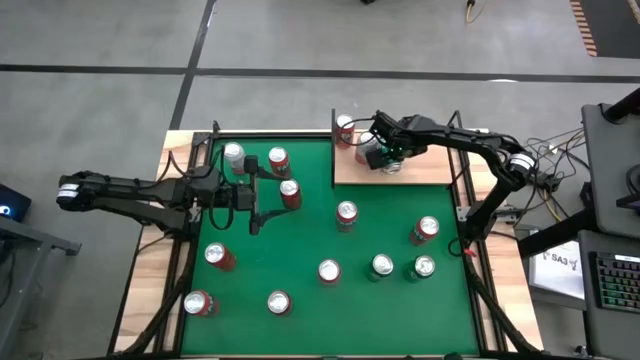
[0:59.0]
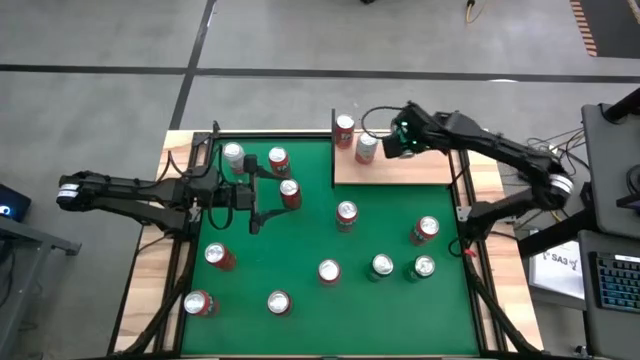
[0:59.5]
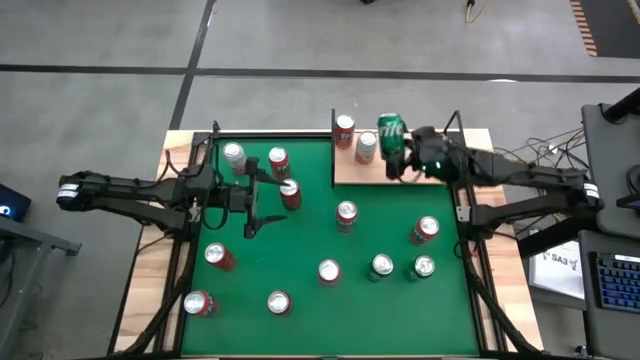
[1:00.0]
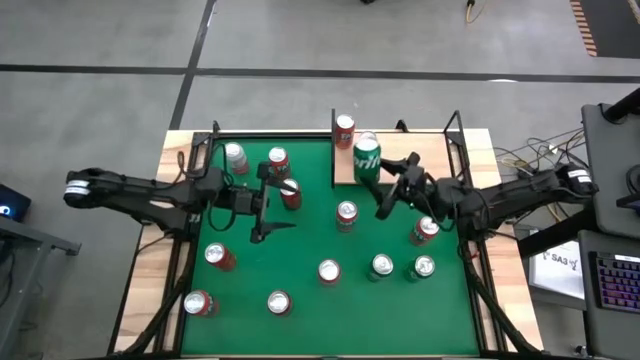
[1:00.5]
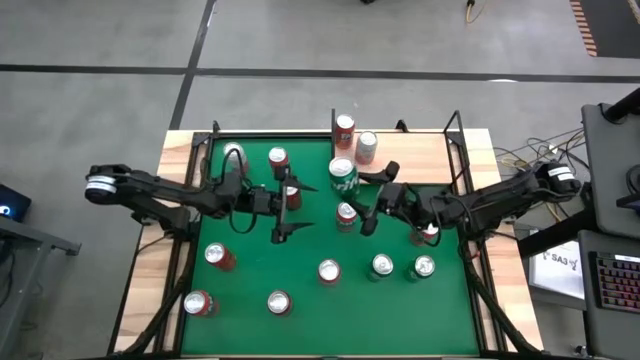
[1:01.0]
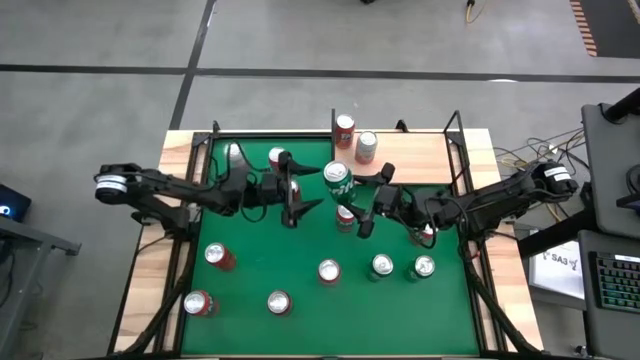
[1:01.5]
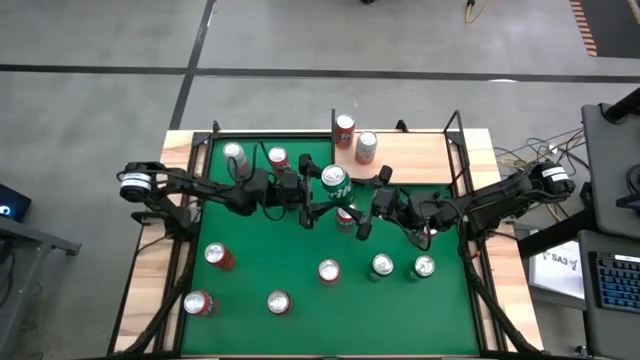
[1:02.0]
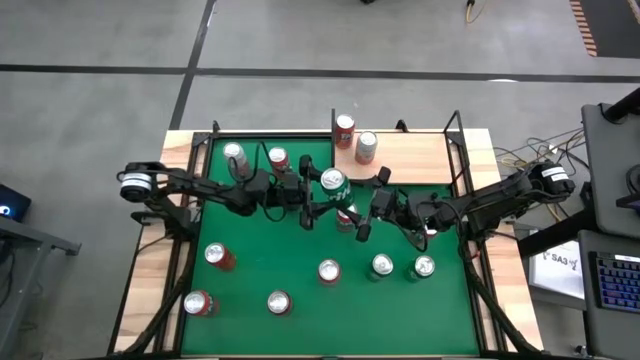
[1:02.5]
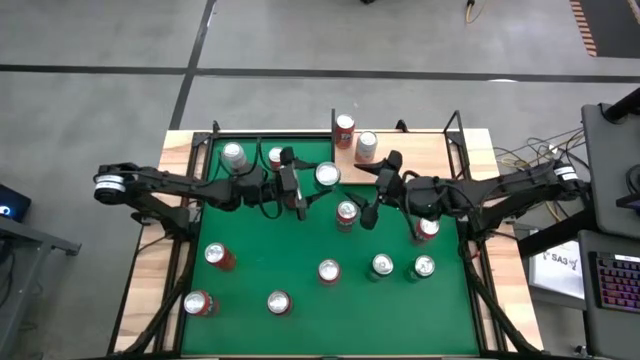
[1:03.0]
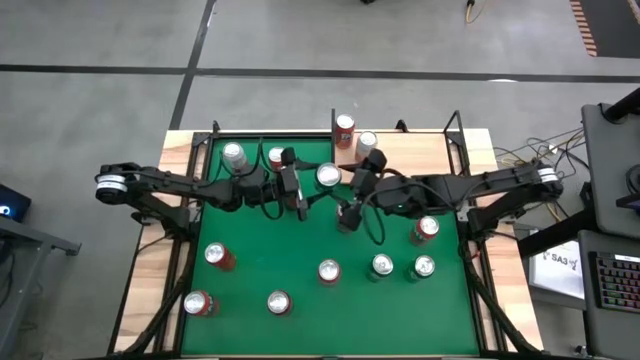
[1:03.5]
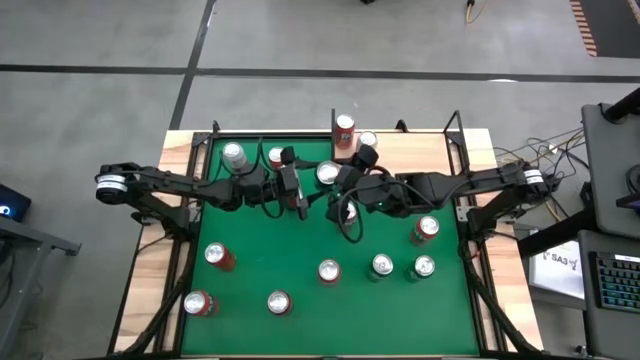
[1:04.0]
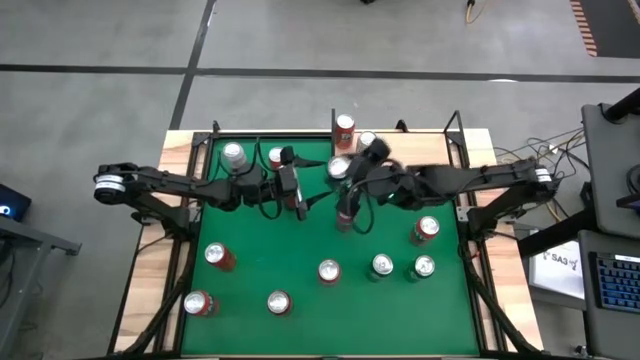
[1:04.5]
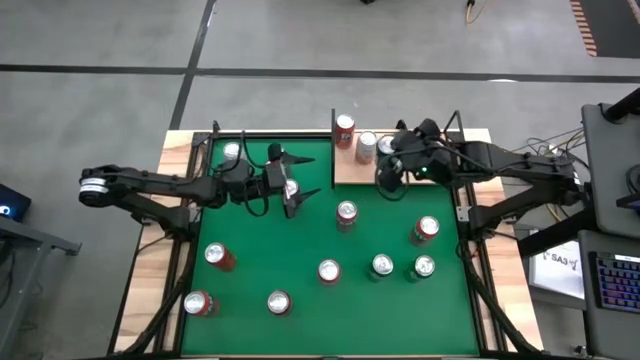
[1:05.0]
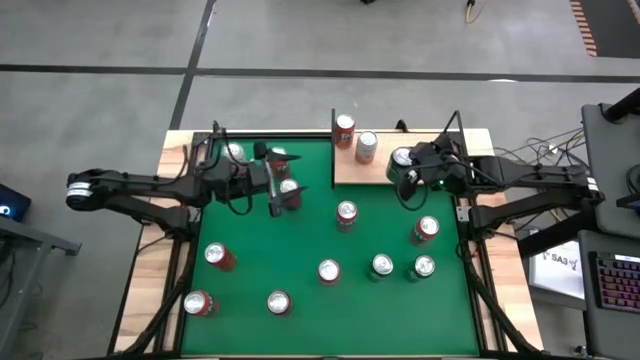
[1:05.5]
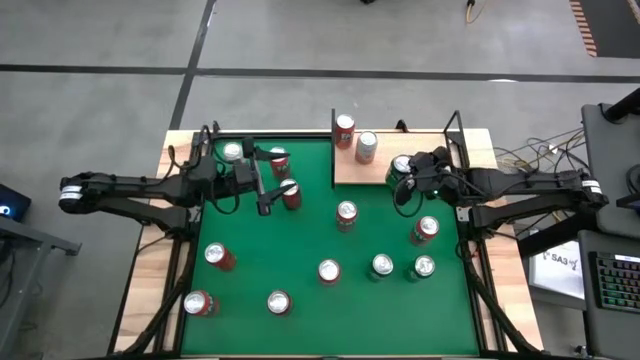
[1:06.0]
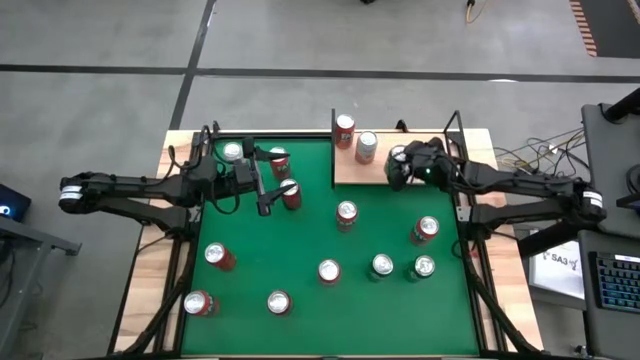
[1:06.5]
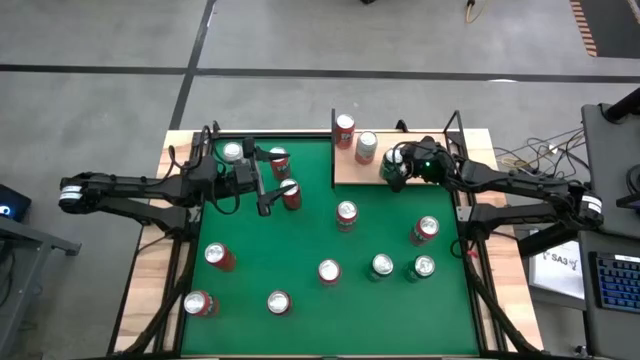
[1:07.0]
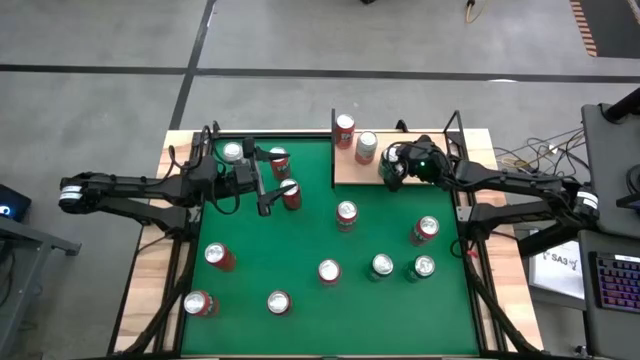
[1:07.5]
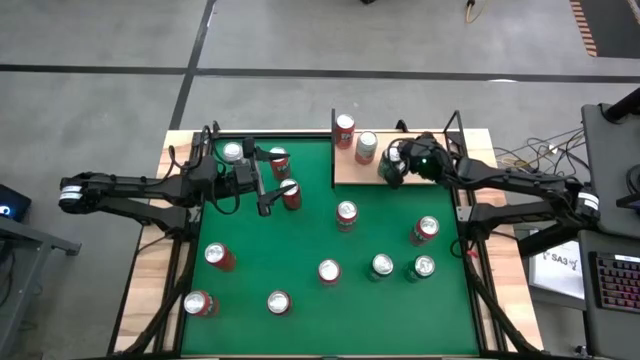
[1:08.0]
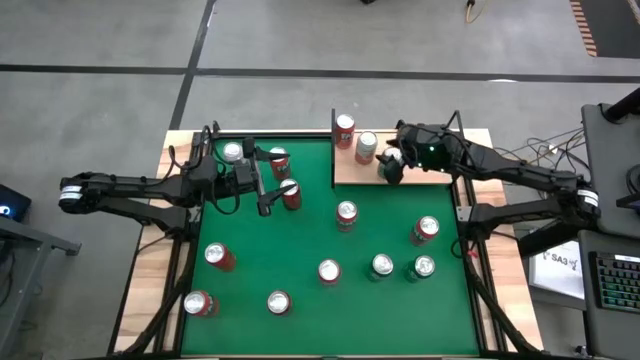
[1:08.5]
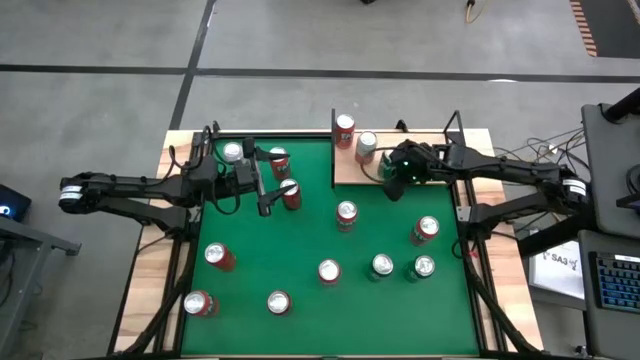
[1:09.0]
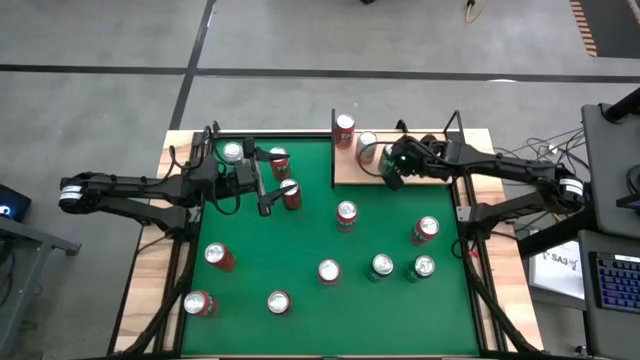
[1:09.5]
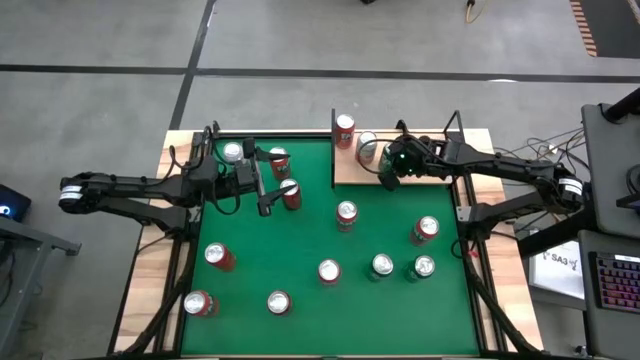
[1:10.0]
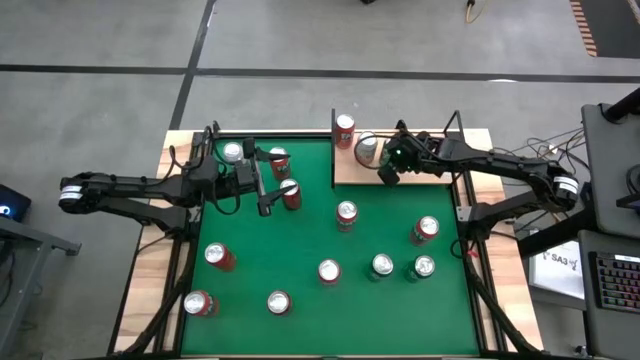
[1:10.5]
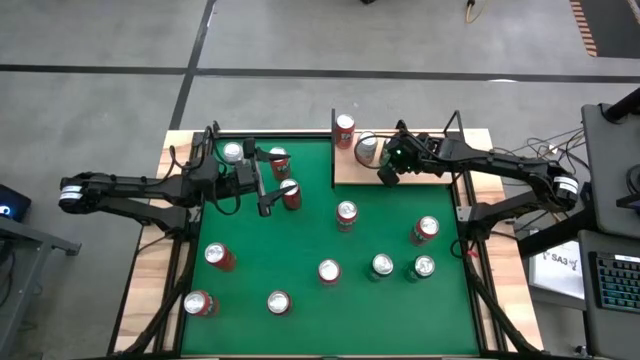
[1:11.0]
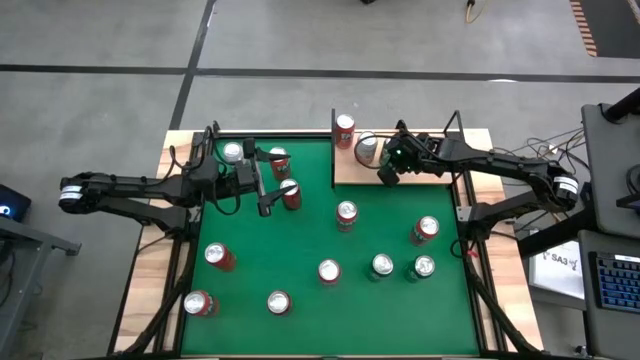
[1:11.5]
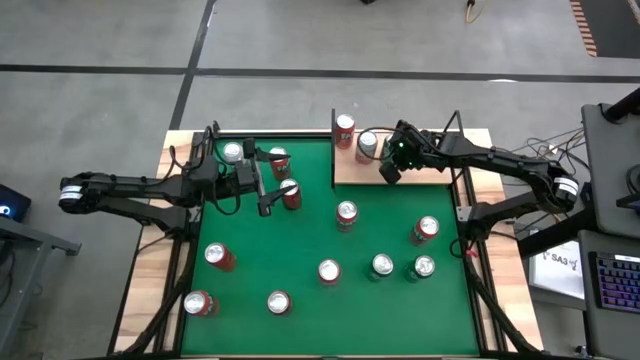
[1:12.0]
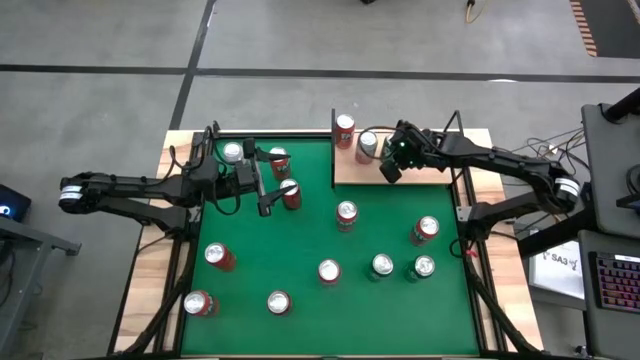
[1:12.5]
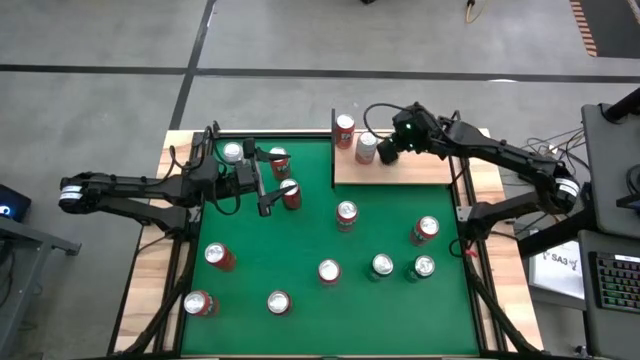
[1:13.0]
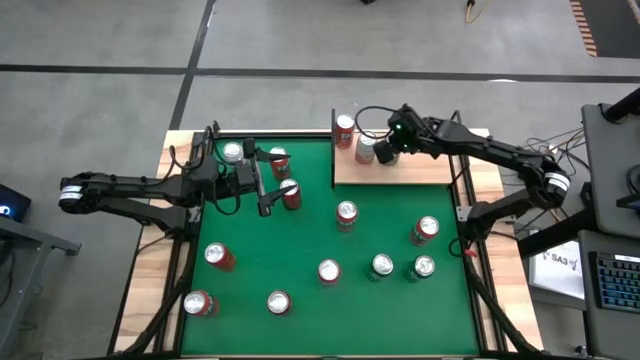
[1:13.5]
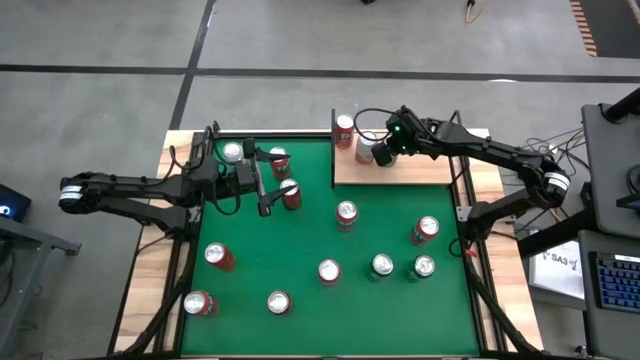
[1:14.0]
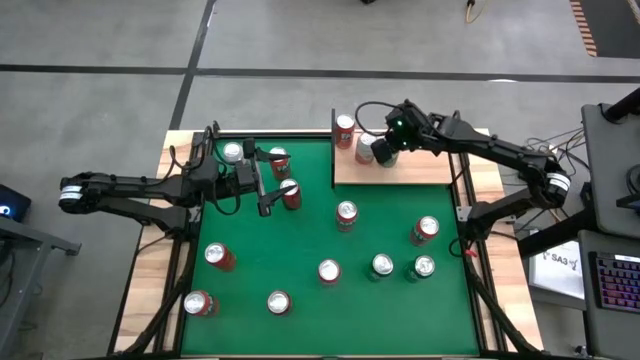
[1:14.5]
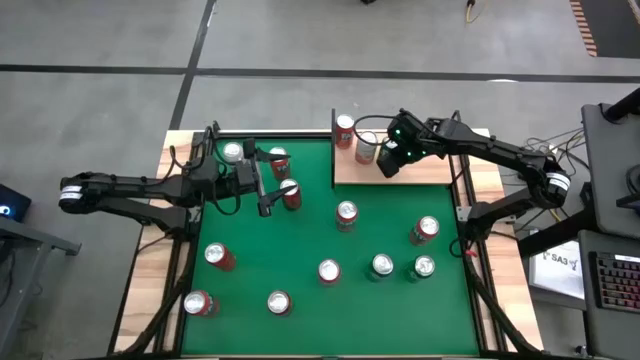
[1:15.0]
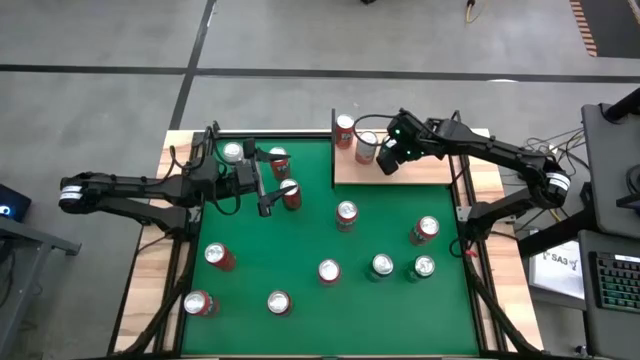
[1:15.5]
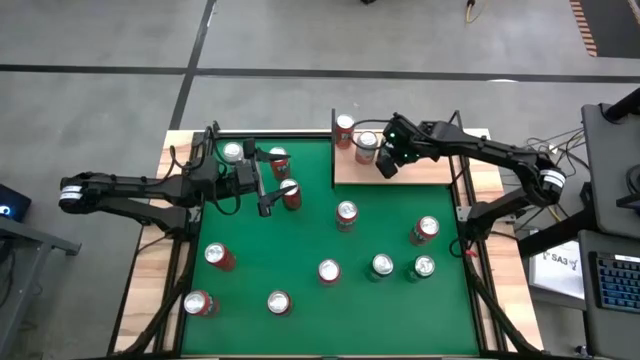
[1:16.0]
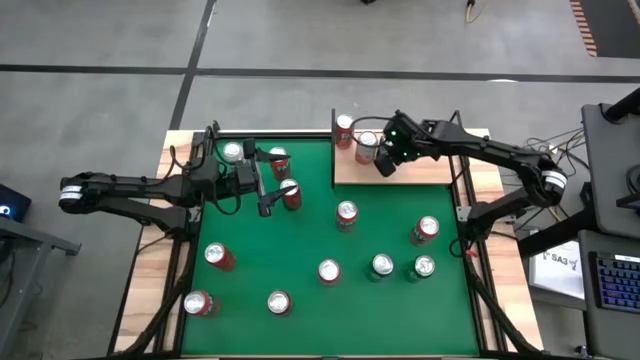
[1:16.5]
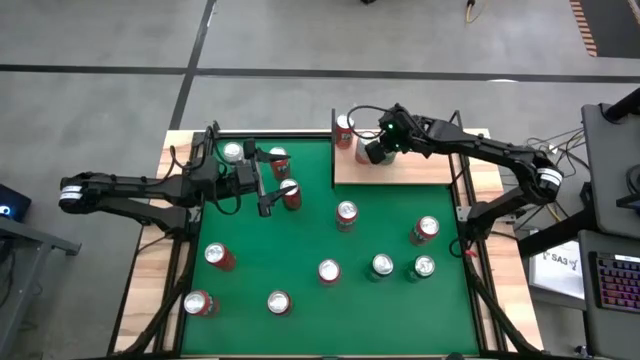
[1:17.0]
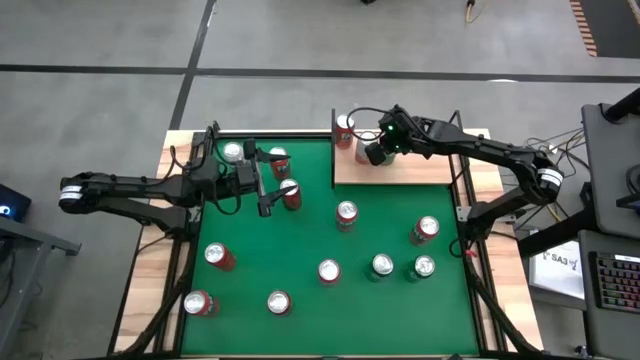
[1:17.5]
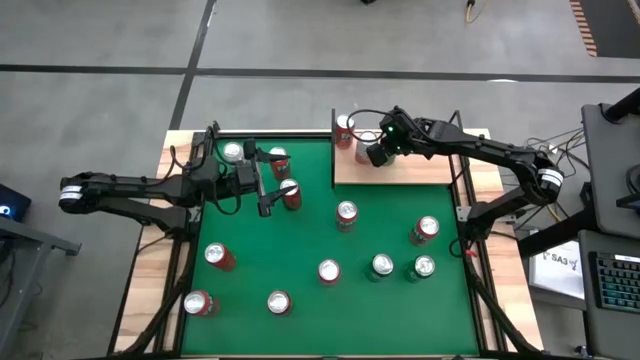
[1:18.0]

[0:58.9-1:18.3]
Task: Place canned beverage on shelf
Put the left green soda can on the shelf
